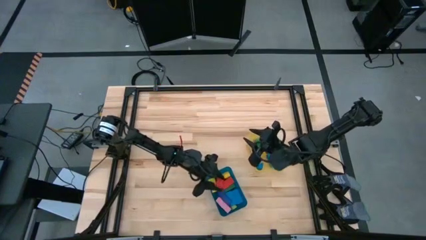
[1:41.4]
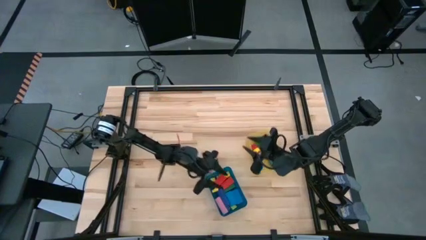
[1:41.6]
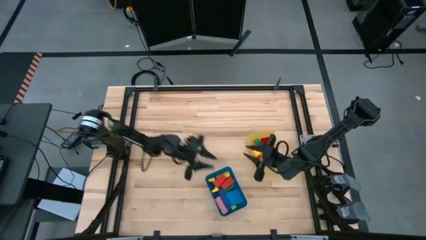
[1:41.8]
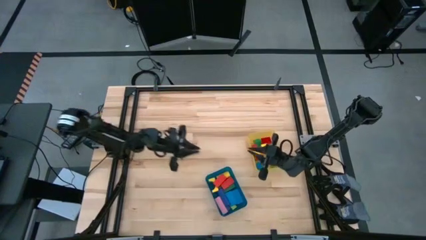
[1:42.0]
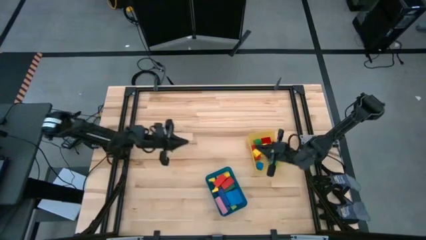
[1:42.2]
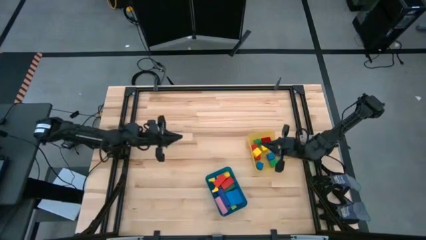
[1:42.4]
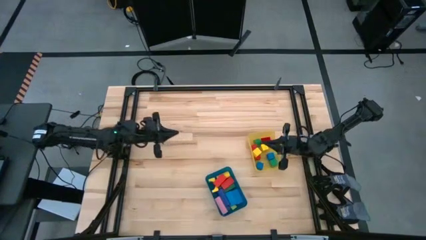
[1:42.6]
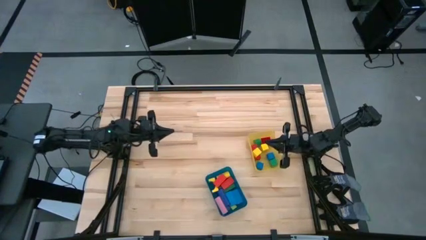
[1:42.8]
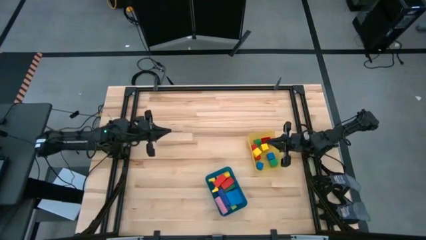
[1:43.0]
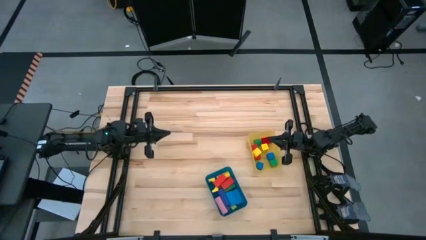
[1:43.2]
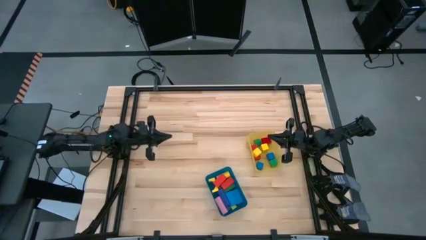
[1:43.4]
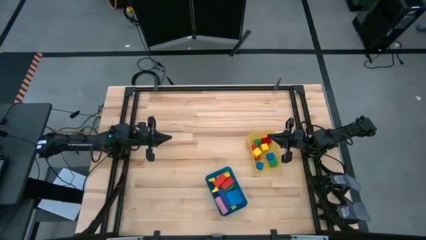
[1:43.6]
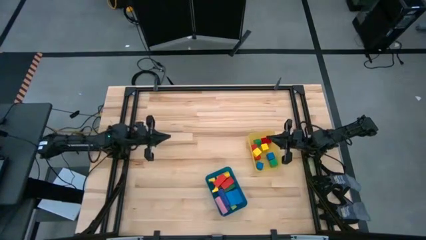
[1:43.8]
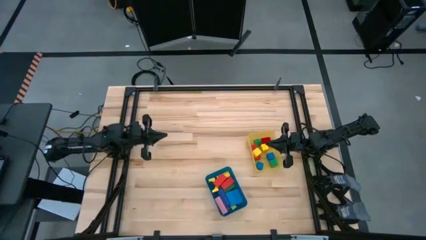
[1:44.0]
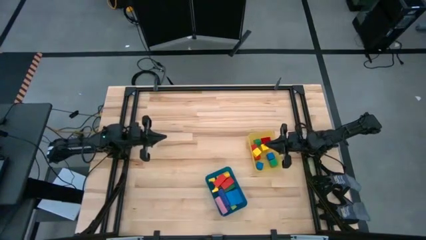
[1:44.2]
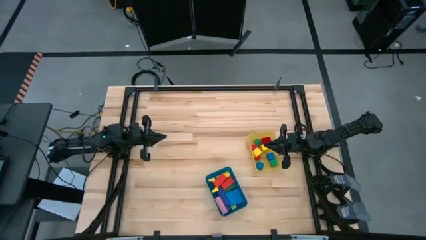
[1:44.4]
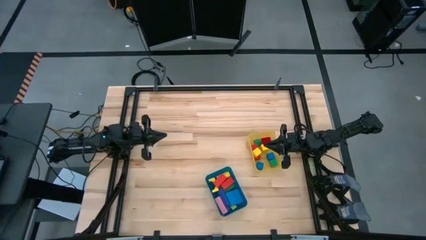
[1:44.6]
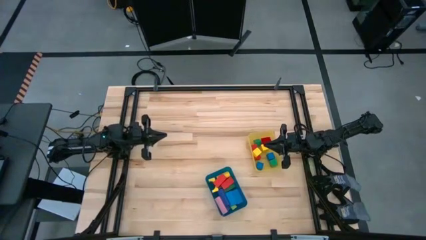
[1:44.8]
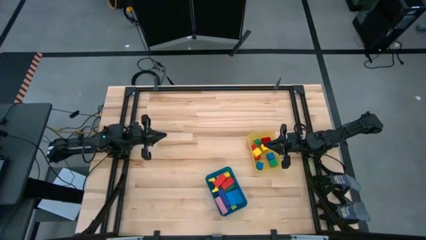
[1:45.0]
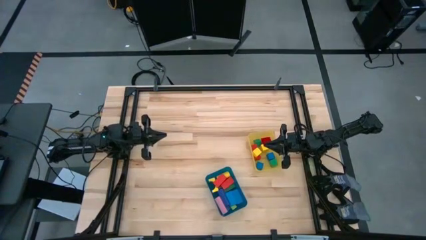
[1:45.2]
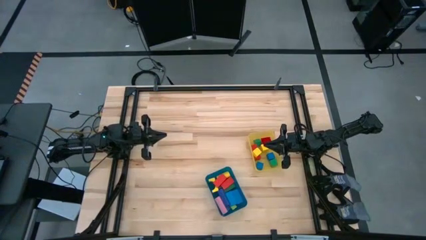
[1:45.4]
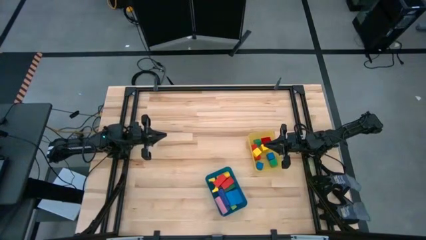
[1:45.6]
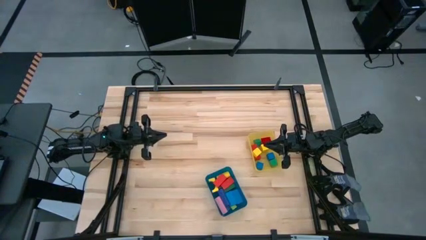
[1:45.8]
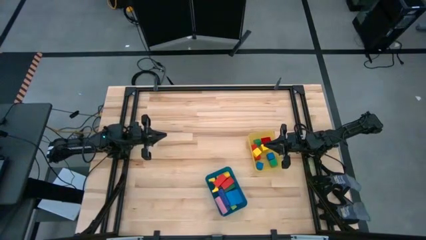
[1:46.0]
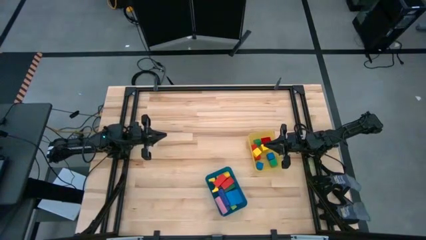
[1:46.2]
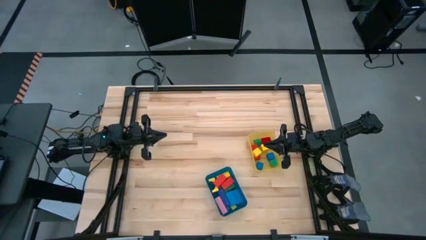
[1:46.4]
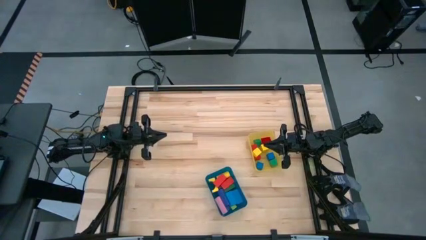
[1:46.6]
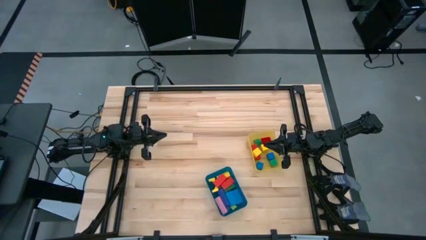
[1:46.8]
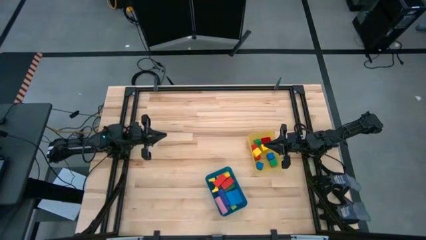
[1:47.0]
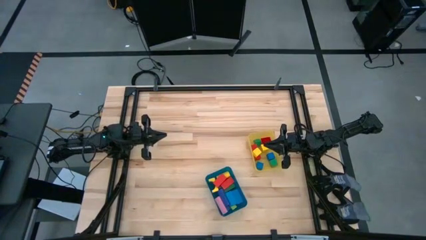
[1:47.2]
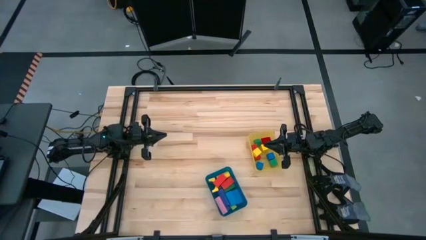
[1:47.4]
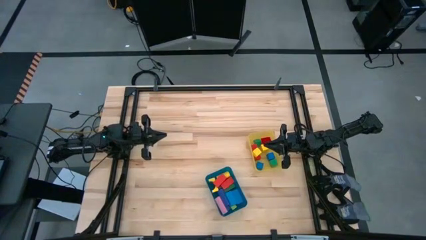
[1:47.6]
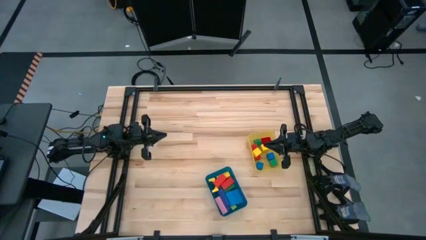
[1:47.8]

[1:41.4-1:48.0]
Task: Sort blocks by size
Return to Home Position

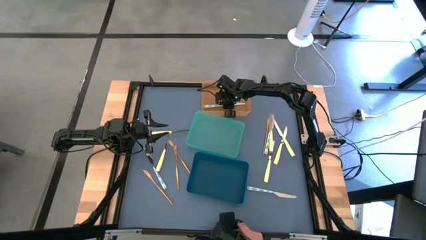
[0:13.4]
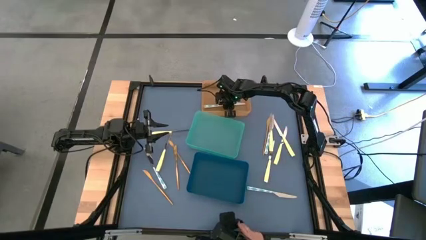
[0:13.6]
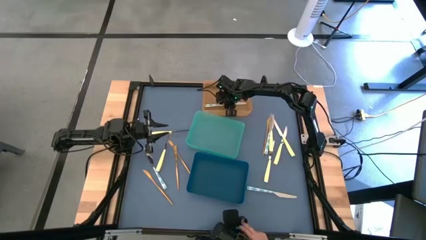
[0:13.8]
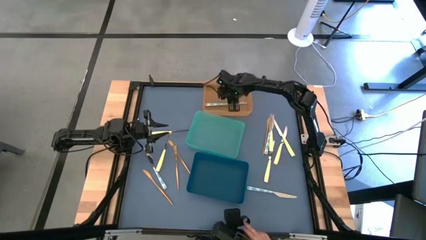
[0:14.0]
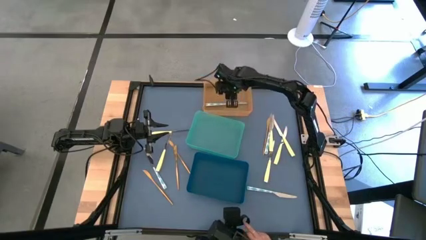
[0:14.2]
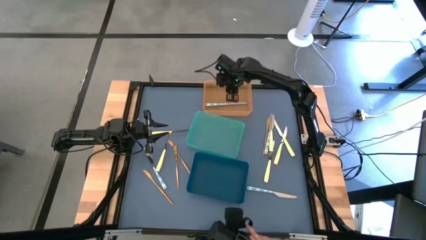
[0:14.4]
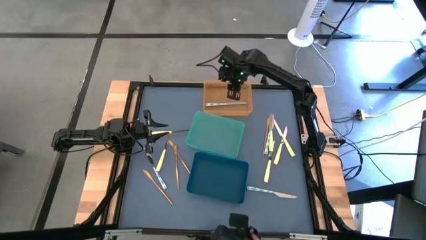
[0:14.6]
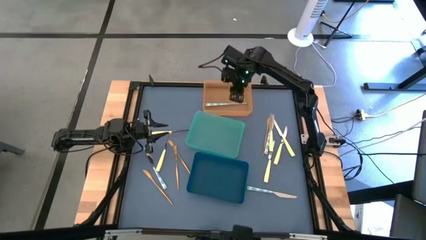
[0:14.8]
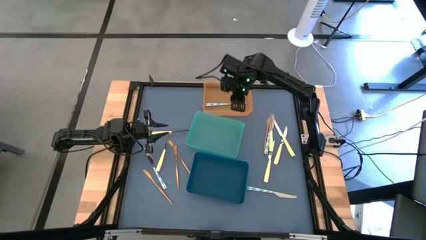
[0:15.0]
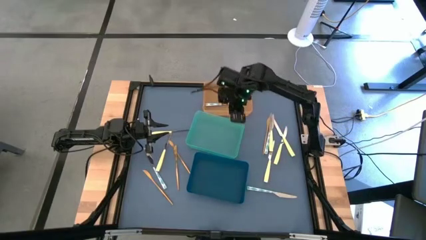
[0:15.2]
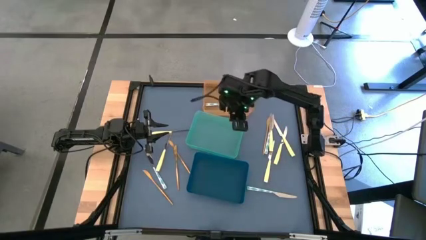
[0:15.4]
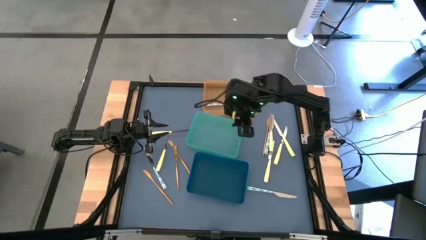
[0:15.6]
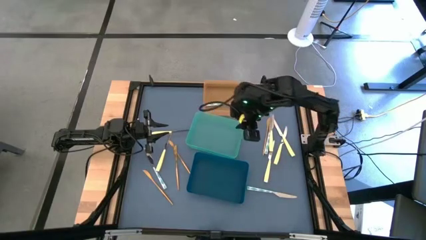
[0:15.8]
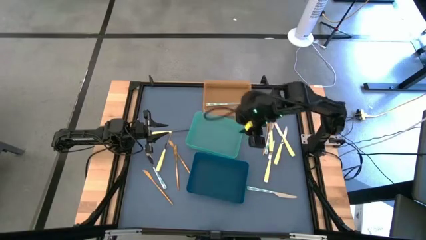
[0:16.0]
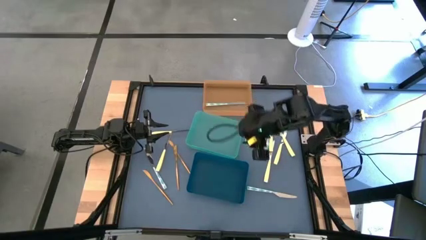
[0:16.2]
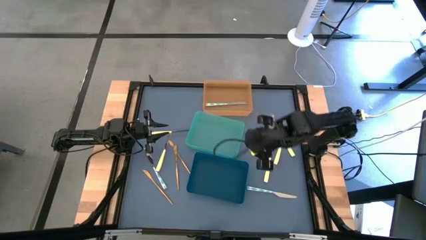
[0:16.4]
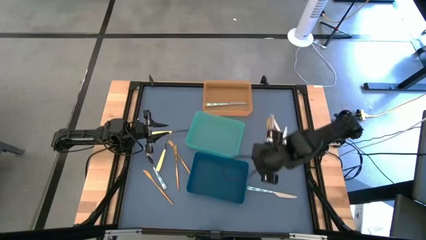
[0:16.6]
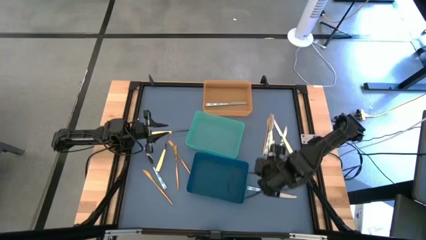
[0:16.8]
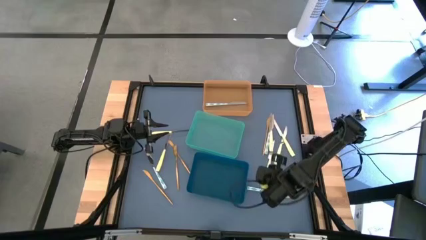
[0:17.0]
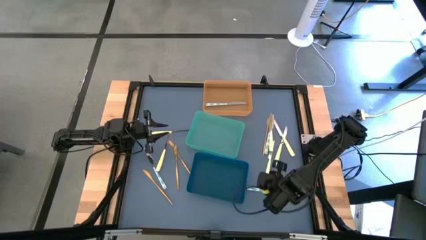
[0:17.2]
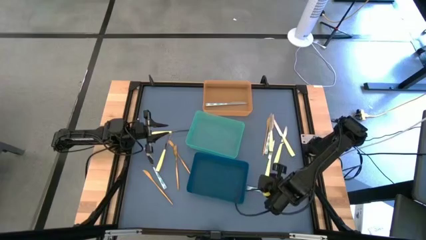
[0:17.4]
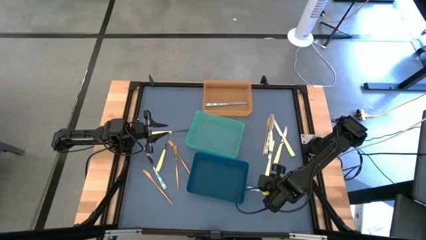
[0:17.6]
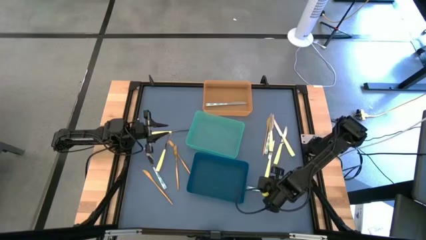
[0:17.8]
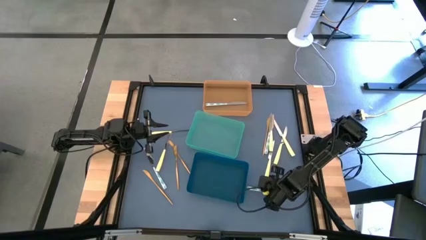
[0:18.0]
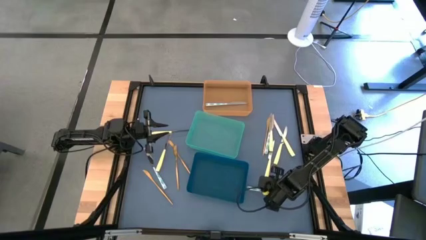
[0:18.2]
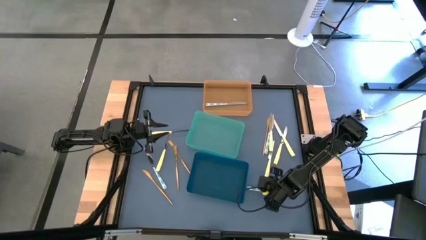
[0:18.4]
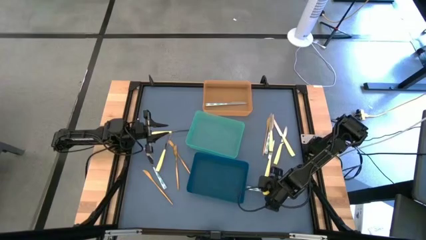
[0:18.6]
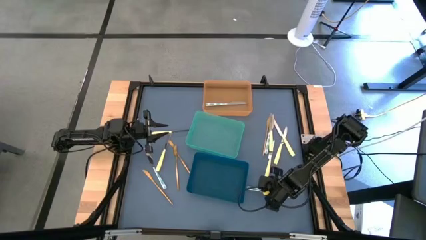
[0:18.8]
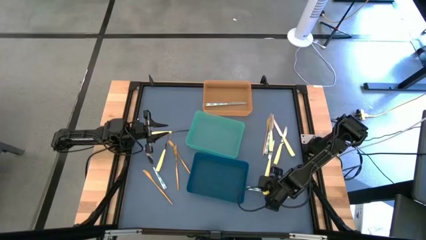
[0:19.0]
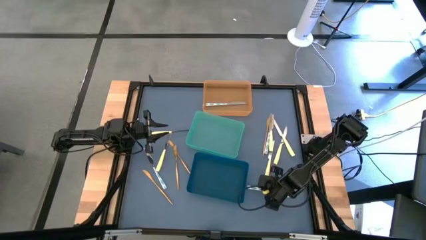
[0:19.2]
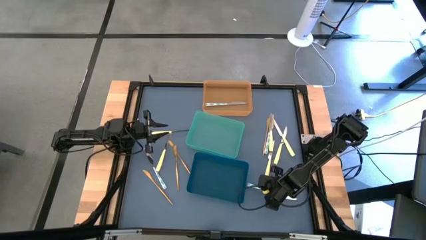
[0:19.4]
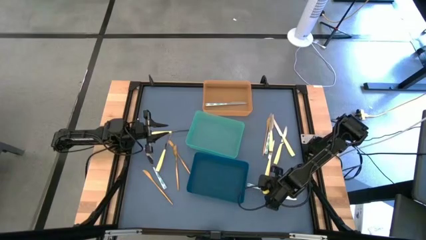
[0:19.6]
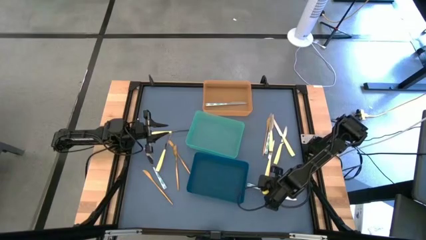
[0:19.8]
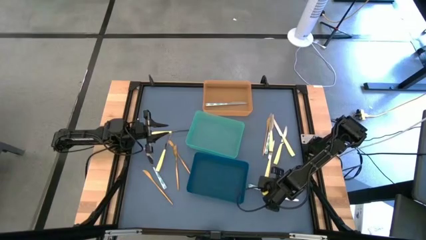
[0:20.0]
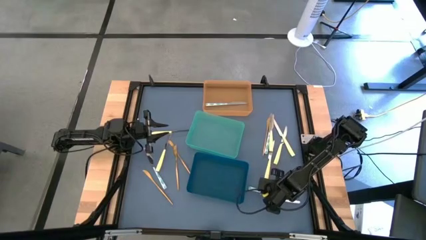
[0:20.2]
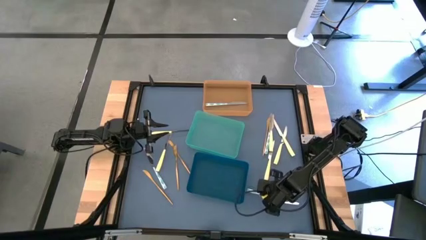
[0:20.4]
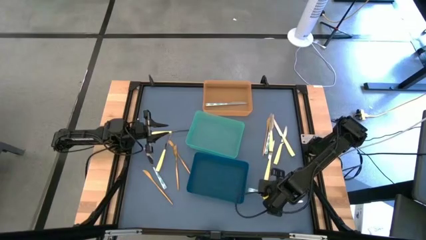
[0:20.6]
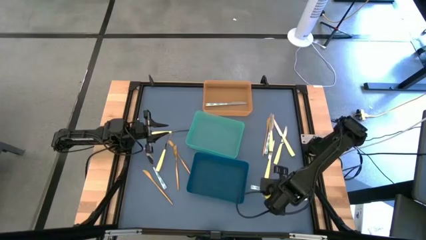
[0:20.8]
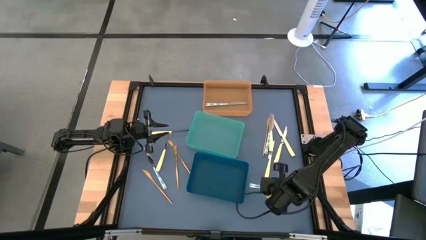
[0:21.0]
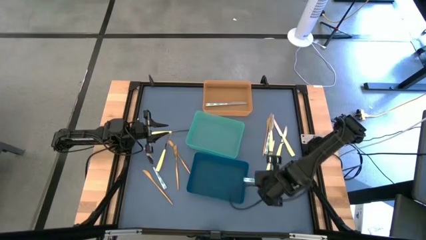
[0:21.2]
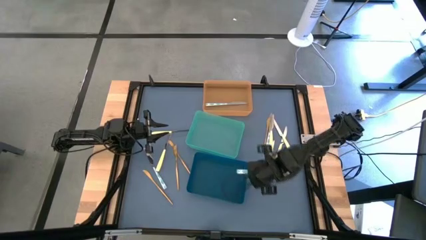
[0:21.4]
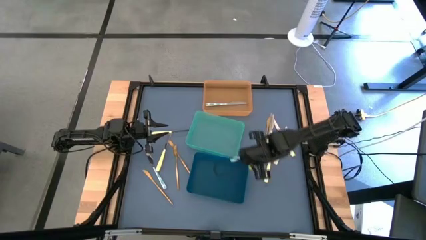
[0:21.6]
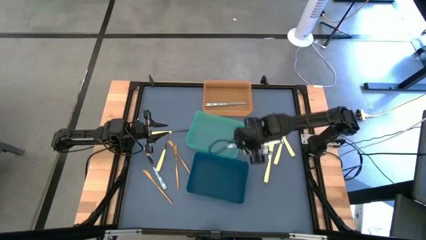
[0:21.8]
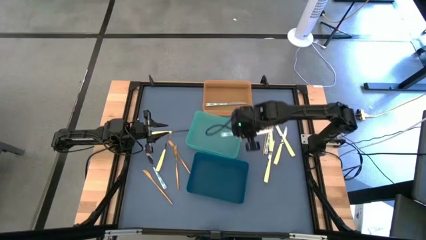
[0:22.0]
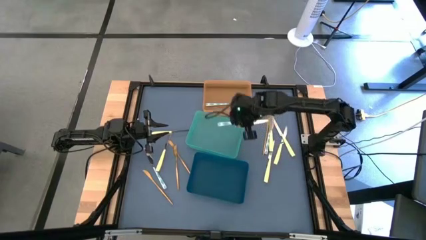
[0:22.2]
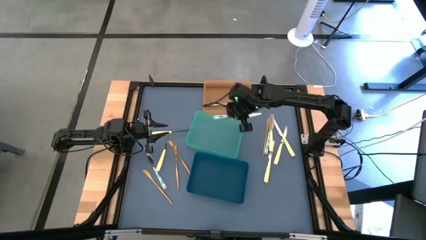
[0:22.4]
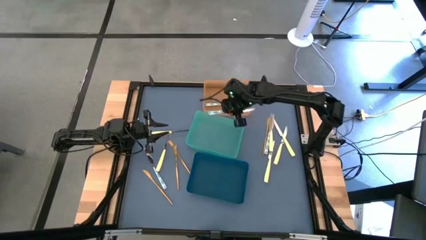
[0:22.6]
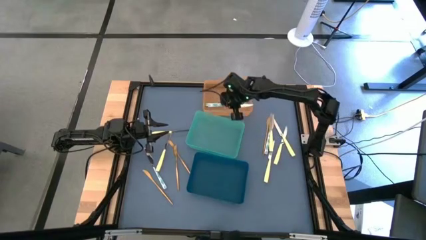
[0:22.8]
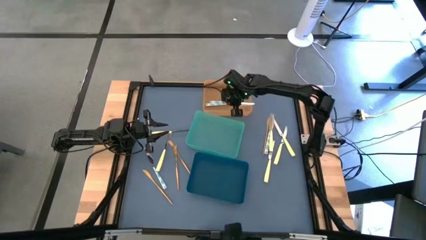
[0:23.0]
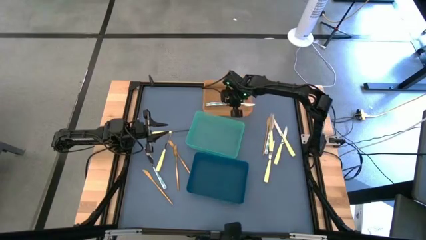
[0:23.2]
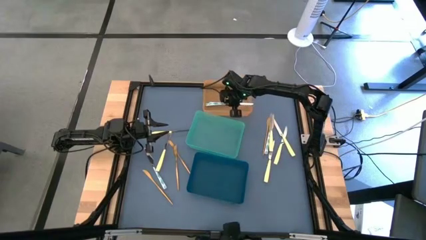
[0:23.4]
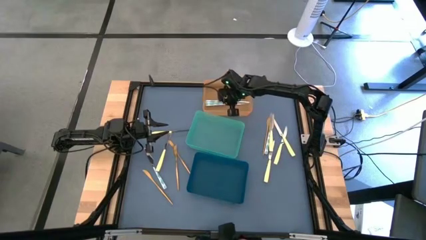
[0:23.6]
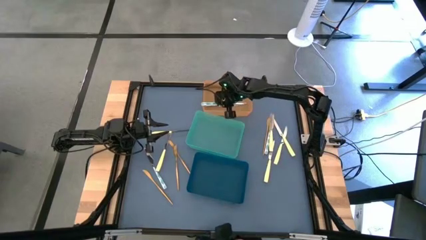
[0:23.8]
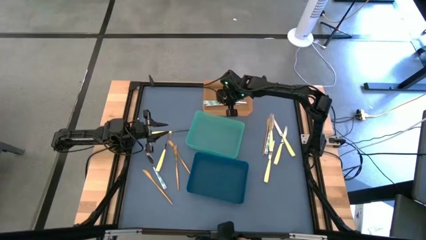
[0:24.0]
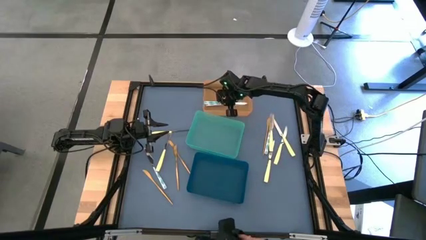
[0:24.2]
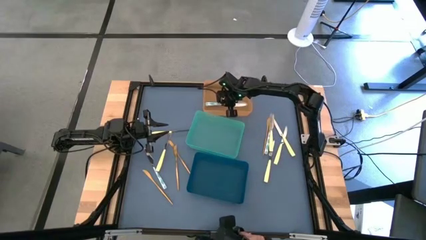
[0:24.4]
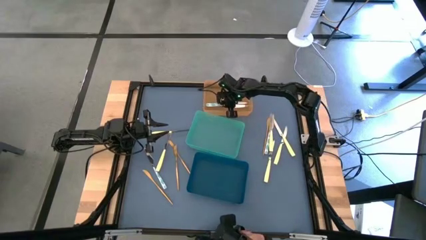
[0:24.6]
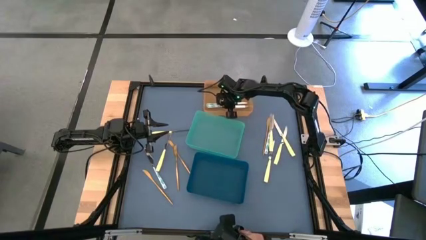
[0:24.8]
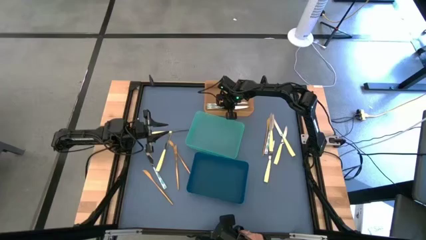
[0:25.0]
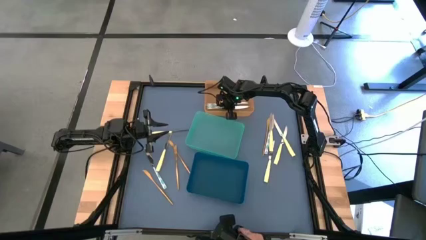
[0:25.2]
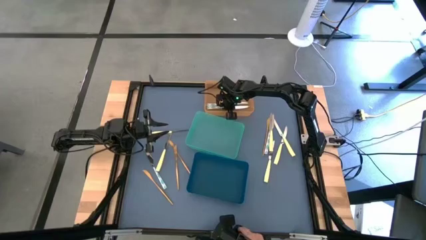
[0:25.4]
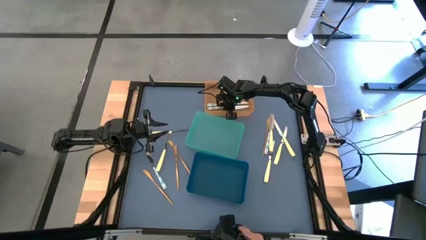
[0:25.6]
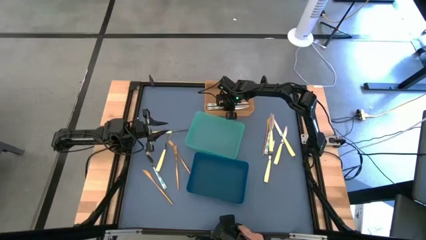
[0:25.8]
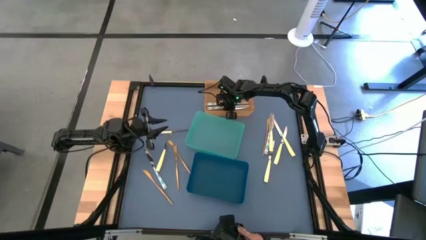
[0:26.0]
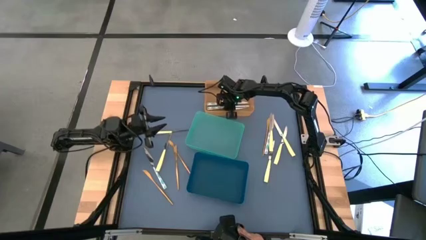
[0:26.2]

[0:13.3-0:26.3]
Task: Sort silverware by color (type)
Put the white and blue knife into the orange bin
